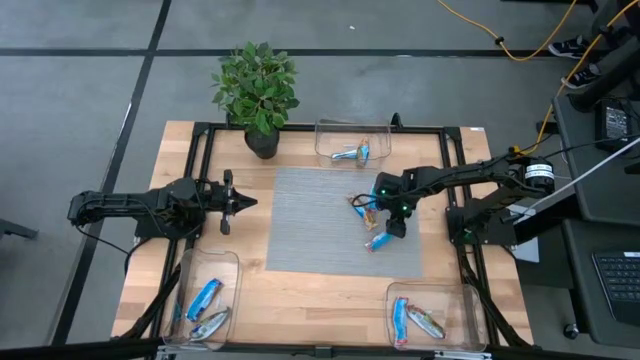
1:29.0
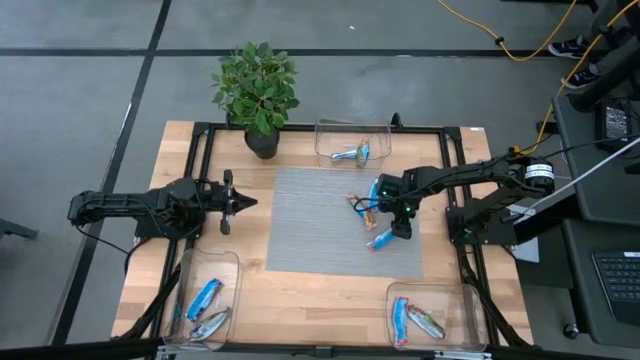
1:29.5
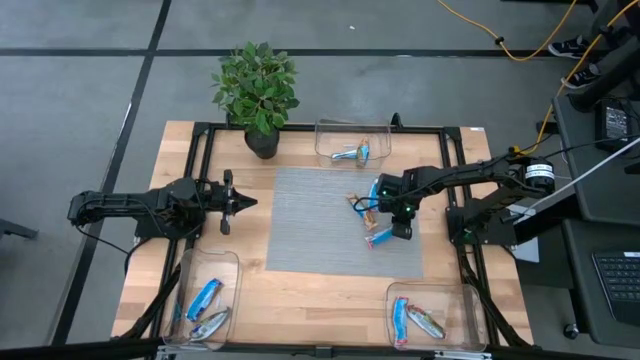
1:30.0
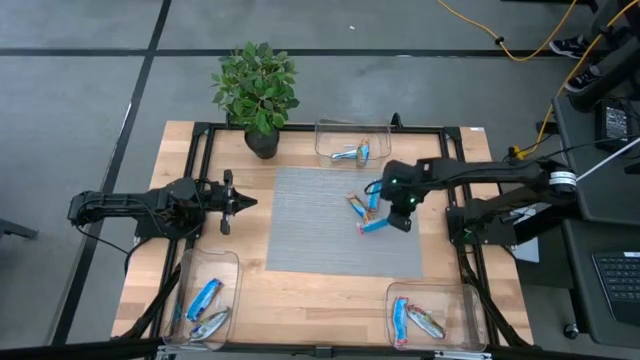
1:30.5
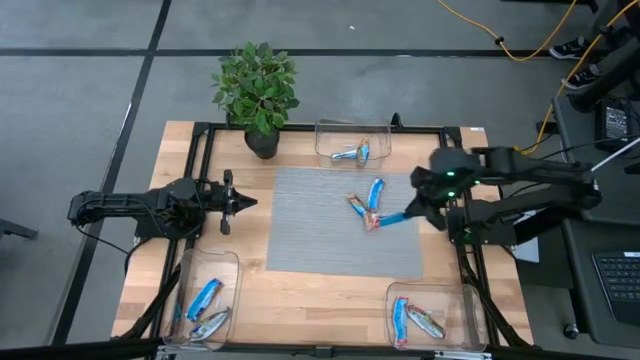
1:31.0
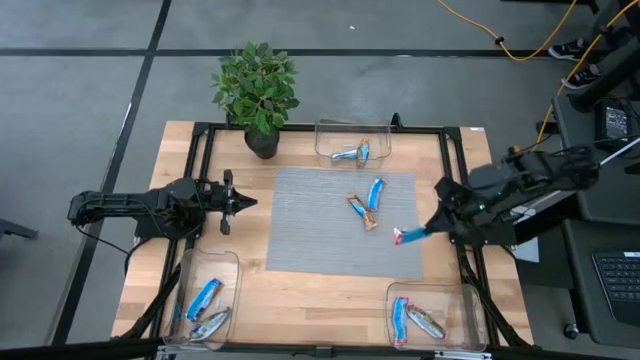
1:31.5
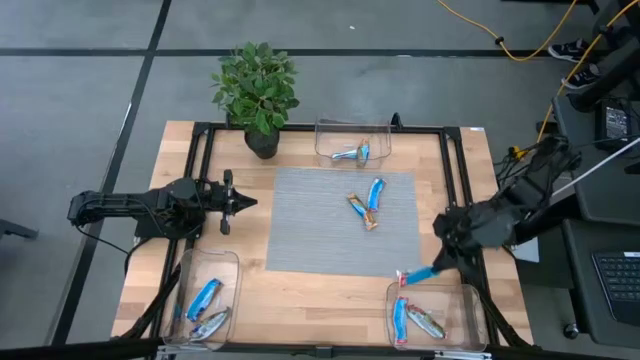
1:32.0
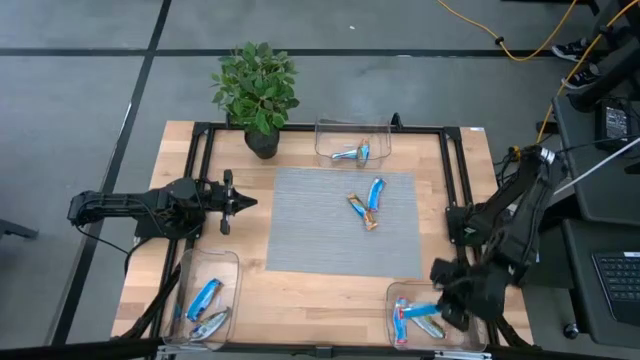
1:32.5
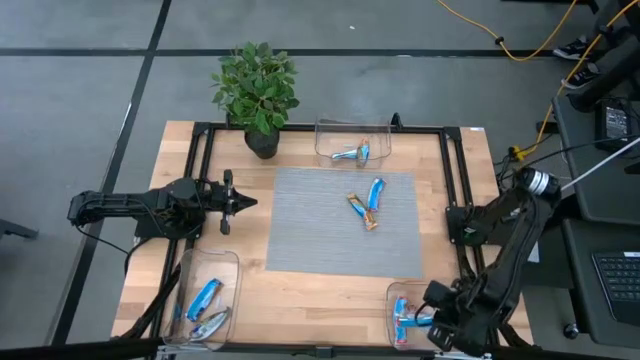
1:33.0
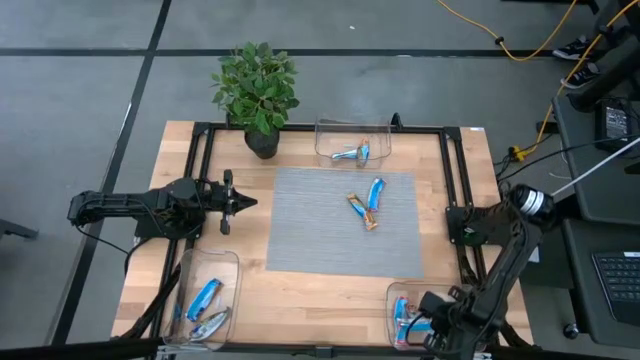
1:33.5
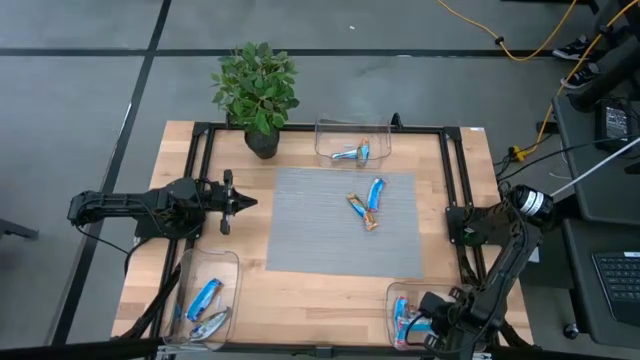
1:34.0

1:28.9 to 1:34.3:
Task: Pick and place Granola Bars by type
Put the red granola bar into the bottom right transparent bin

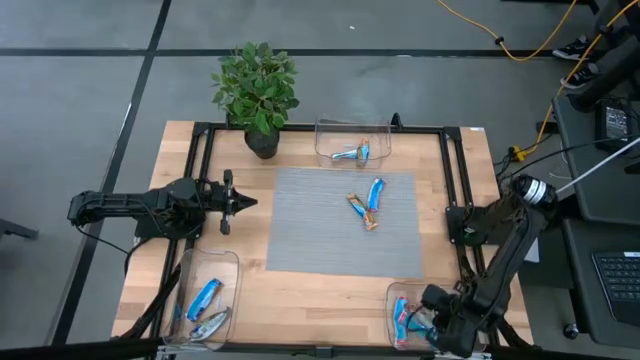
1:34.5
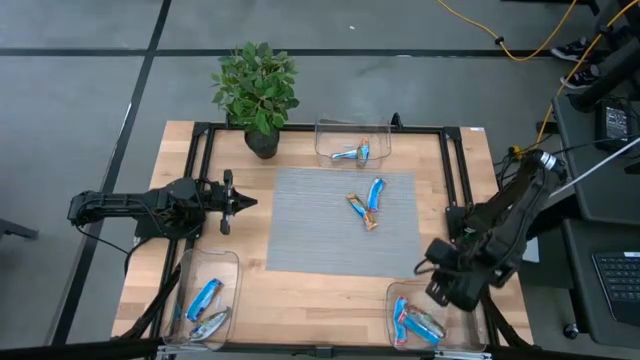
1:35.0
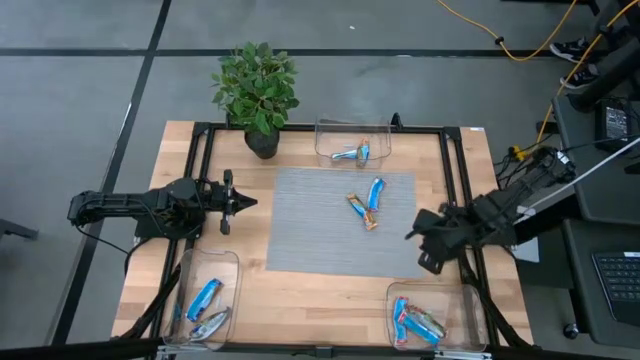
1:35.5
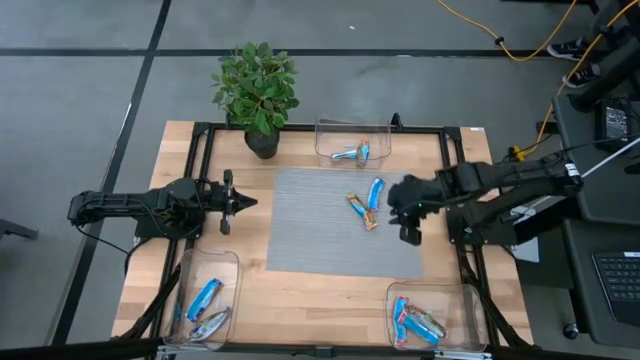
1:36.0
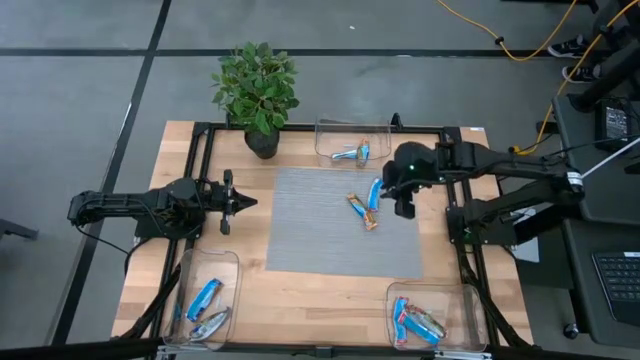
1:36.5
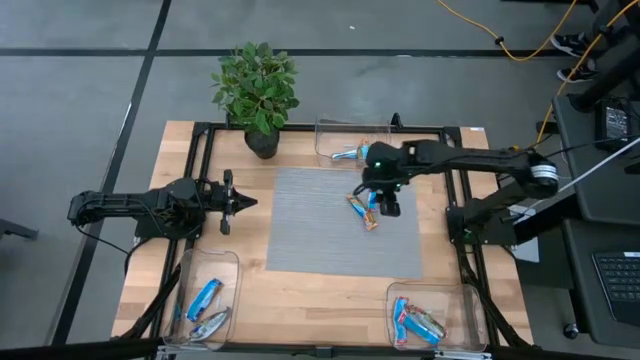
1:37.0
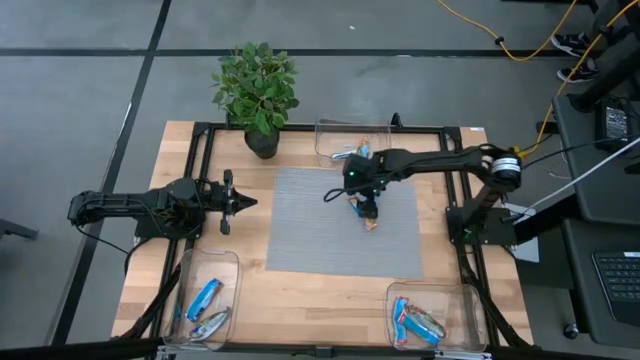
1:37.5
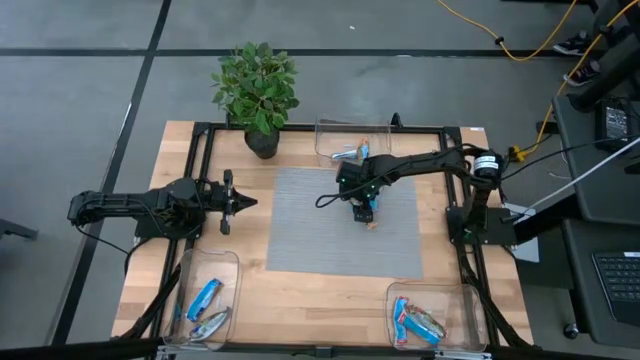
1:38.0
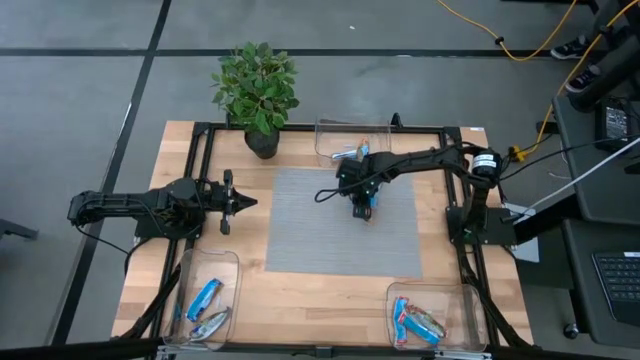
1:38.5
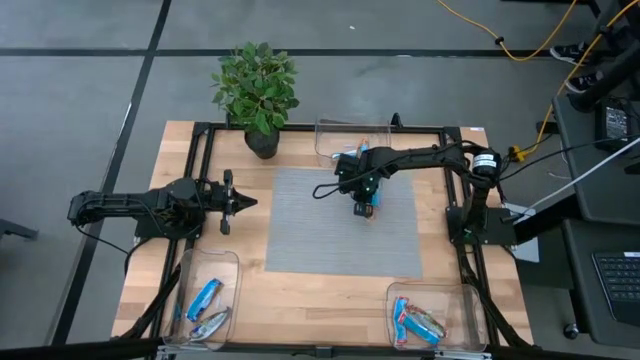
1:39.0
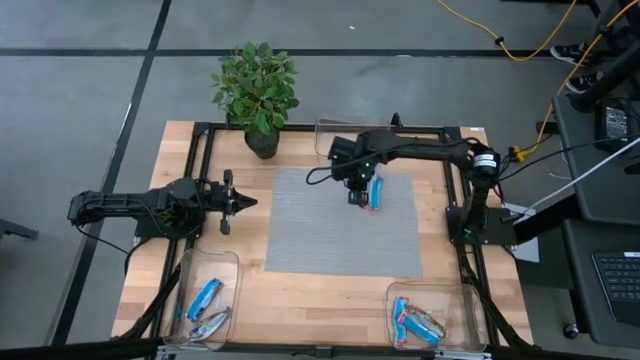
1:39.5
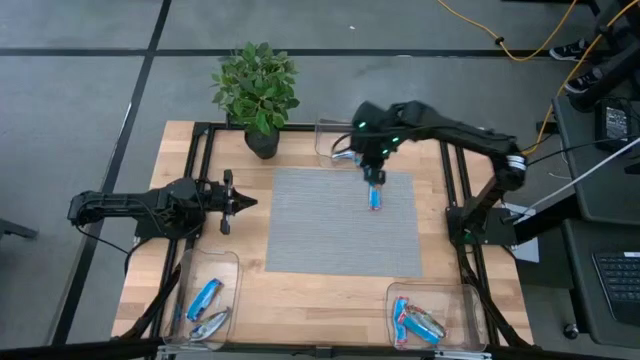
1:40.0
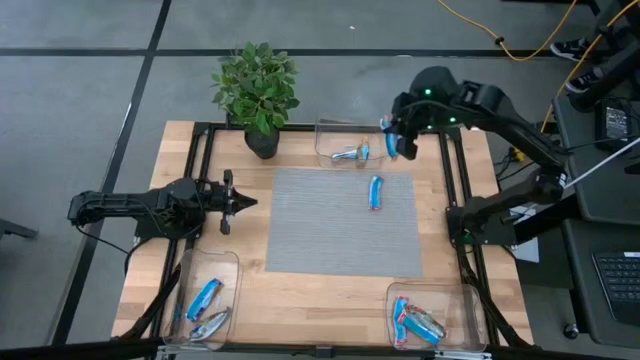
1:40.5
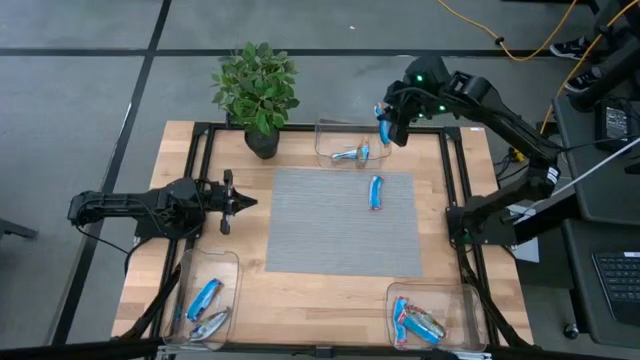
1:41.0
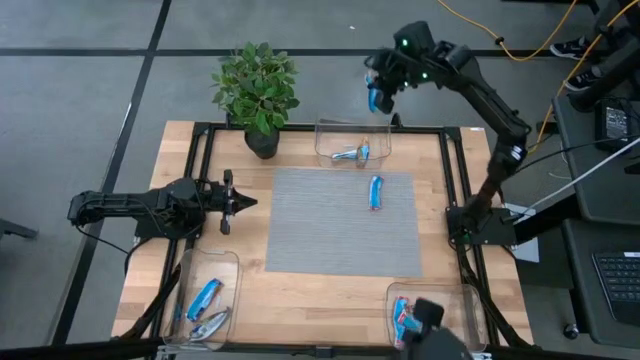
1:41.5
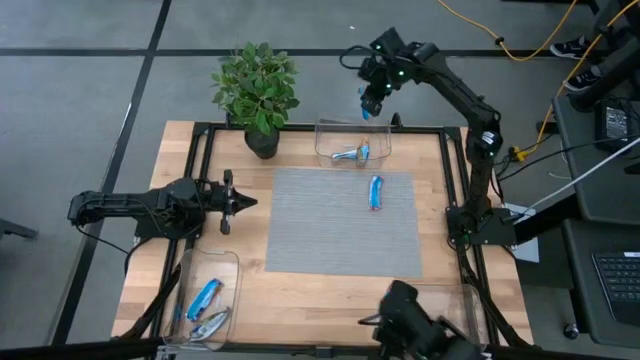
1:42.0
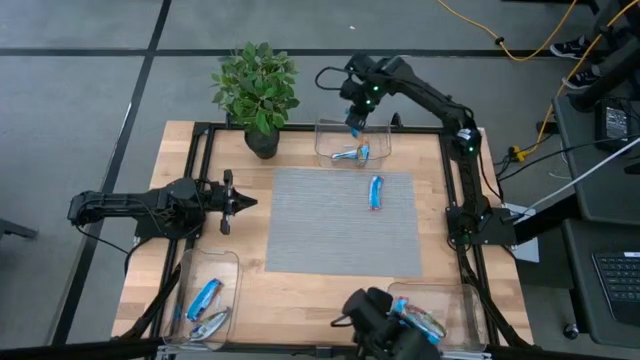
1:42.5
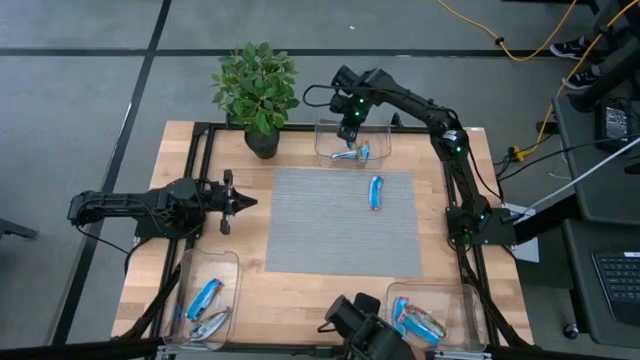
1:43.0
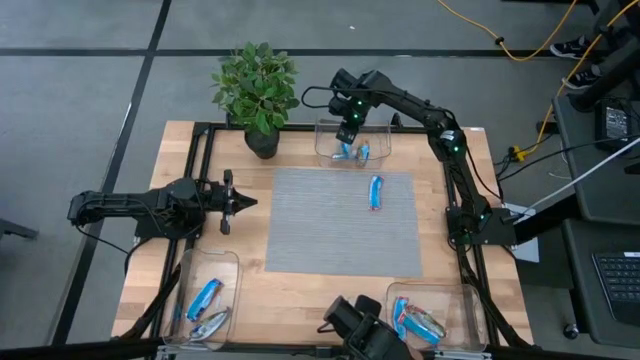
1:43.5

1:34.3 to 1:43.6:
Put the yellow granola bar into the top transparent bin

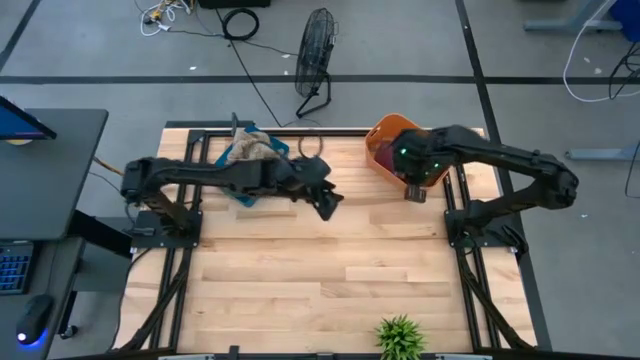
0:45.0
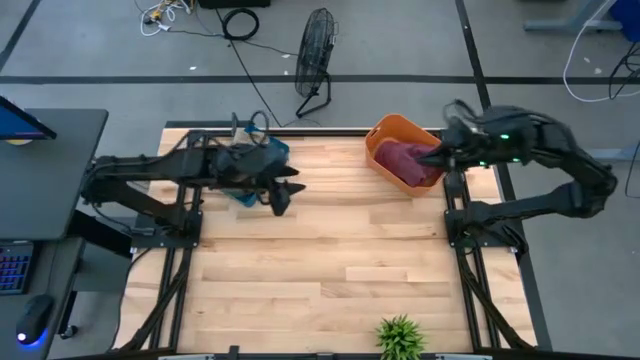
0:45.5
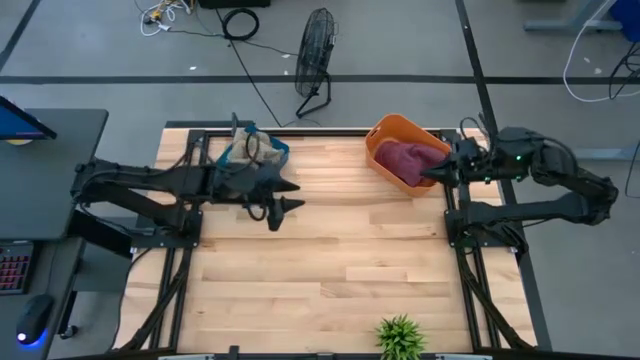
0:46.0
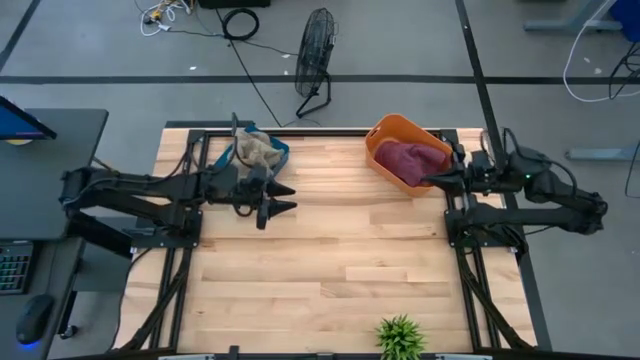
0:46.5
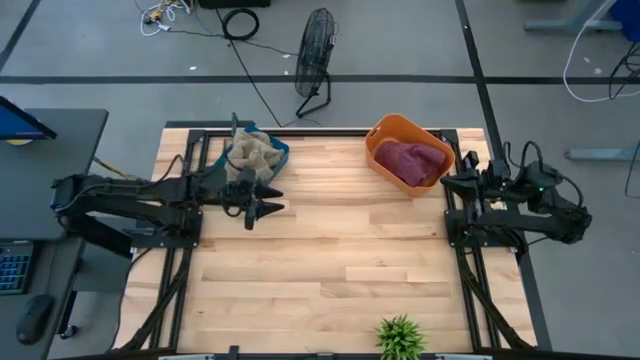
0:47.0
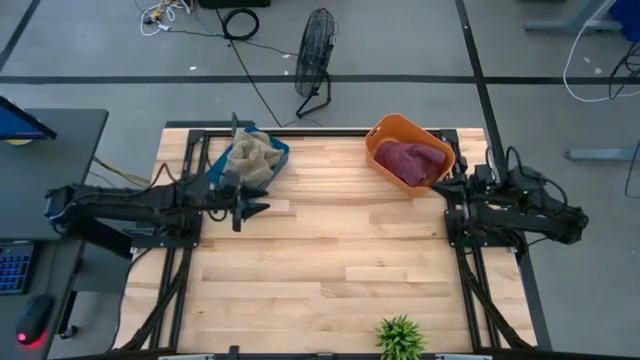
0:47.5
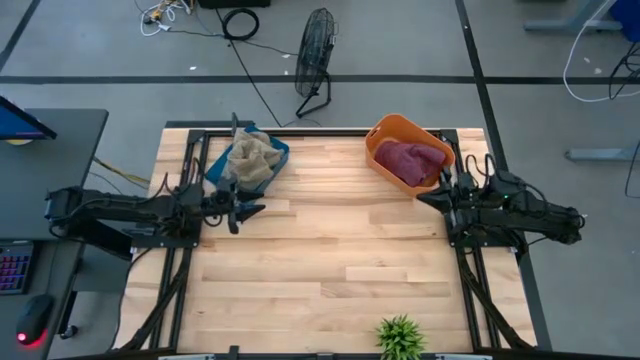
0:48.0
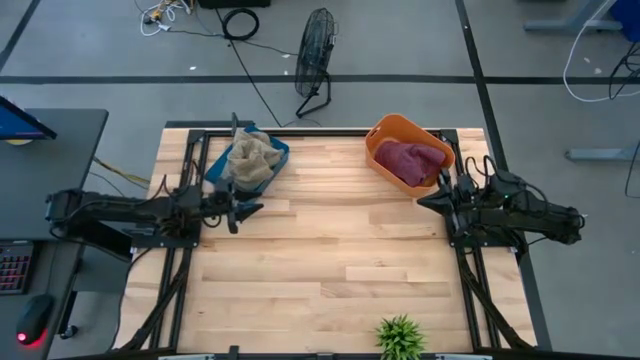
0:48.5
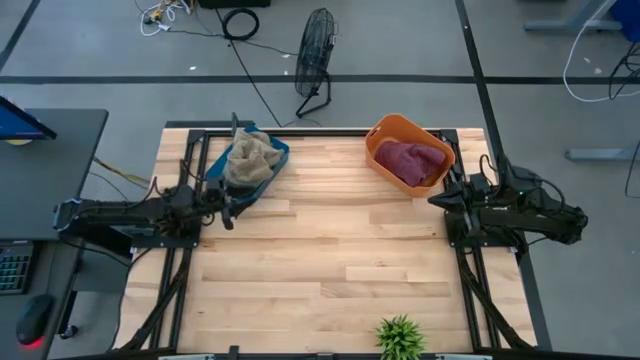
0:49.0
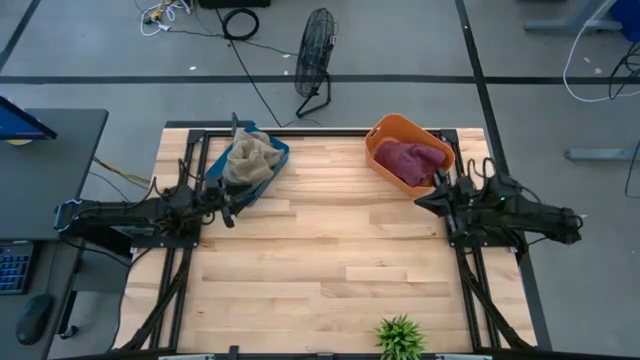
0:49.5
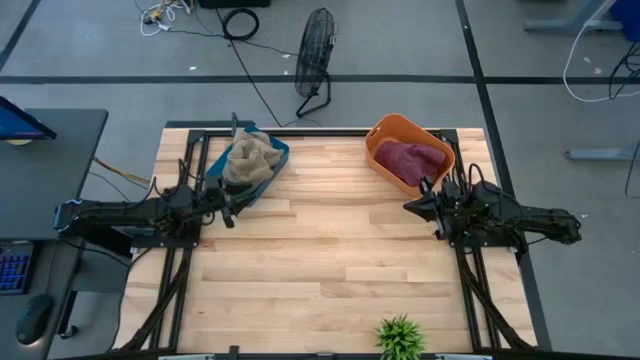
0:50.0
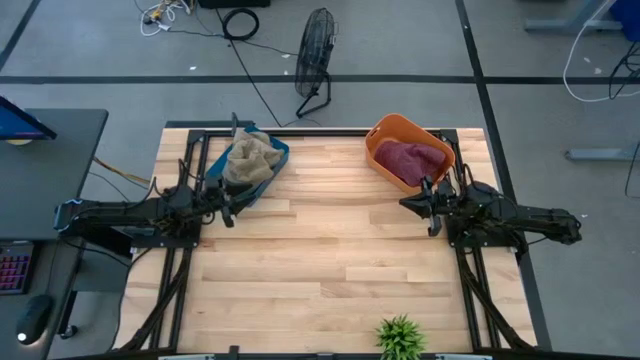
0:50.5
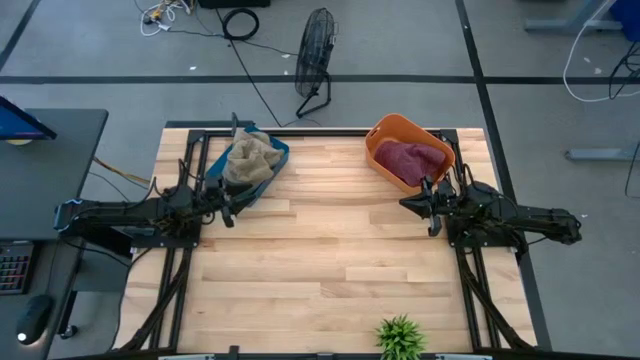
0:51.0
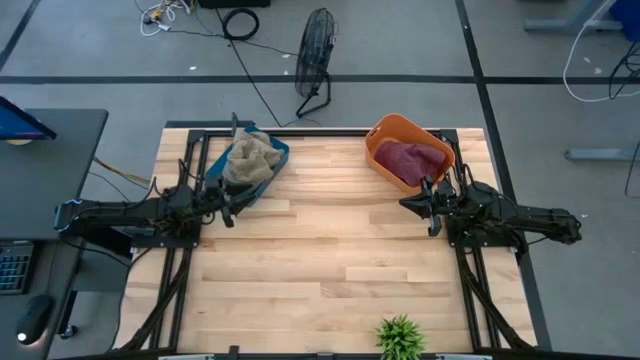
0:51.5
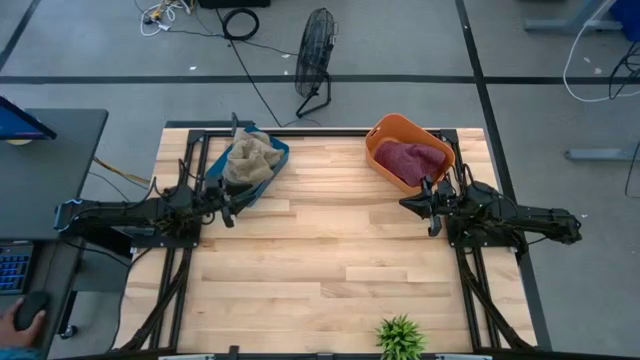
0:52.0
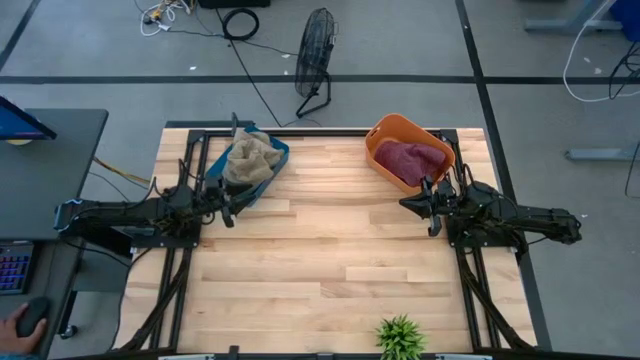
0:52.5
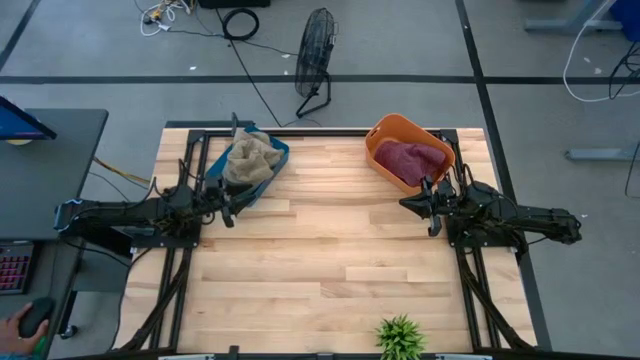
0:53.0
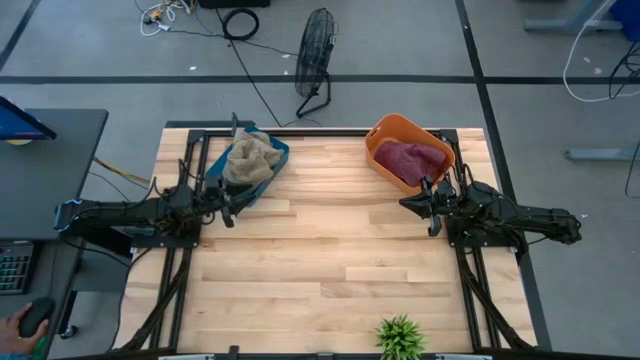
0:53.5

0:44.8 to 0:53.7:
Task: Pick & Place hat
Return to Home Position
